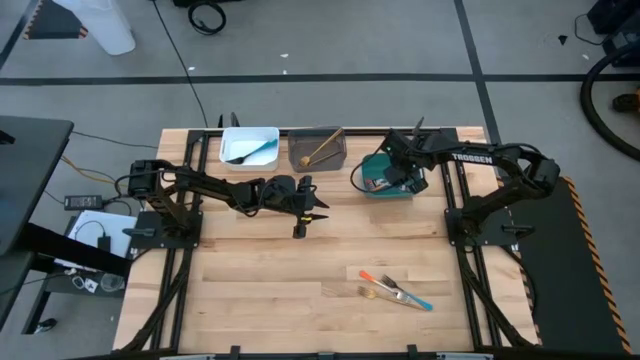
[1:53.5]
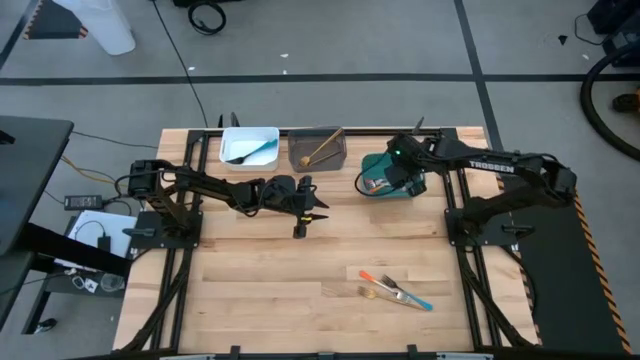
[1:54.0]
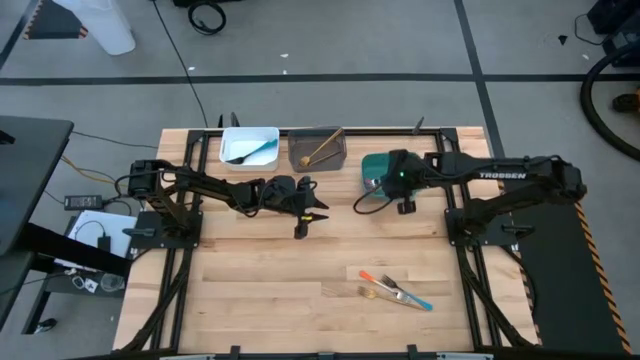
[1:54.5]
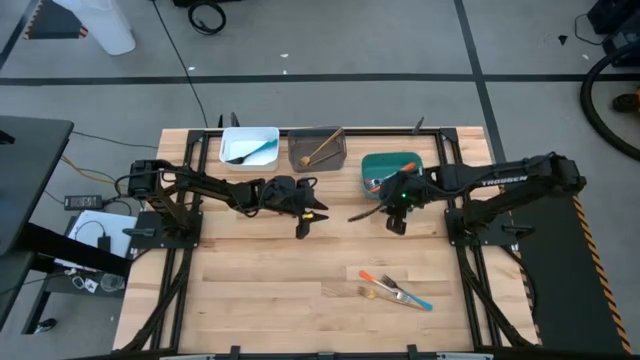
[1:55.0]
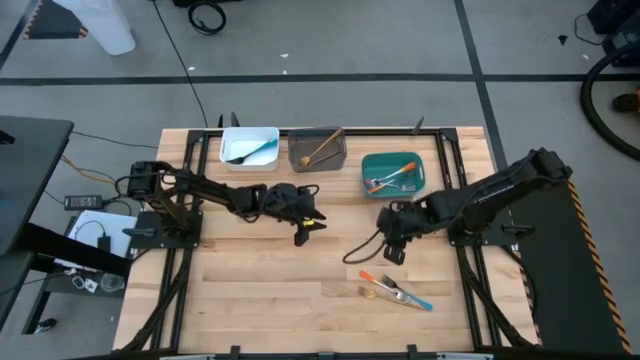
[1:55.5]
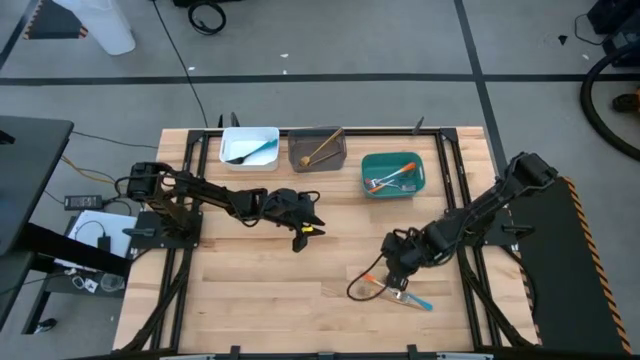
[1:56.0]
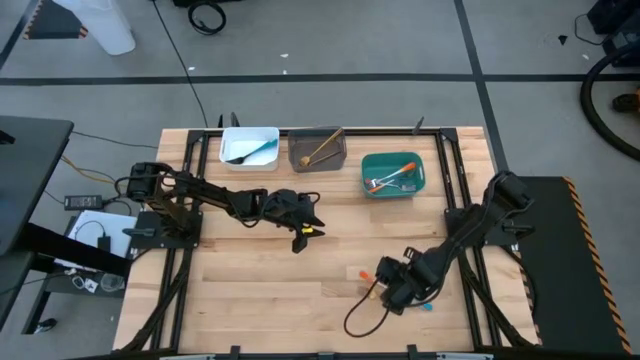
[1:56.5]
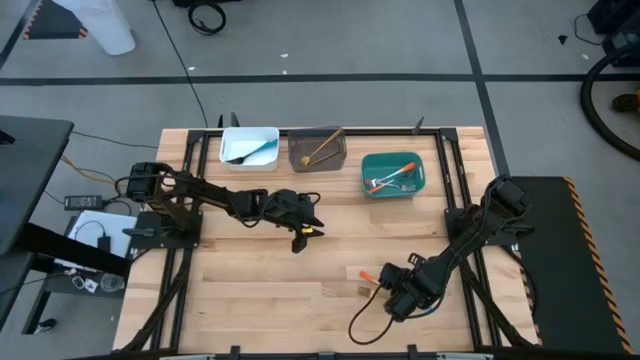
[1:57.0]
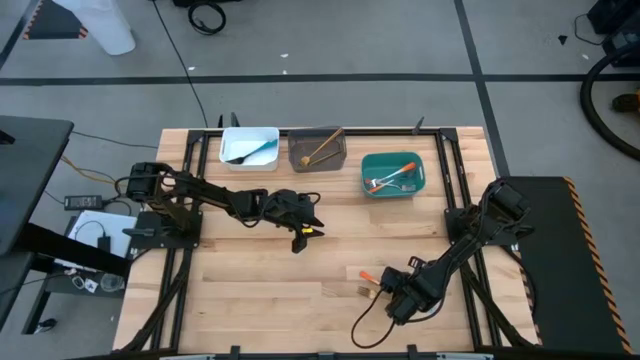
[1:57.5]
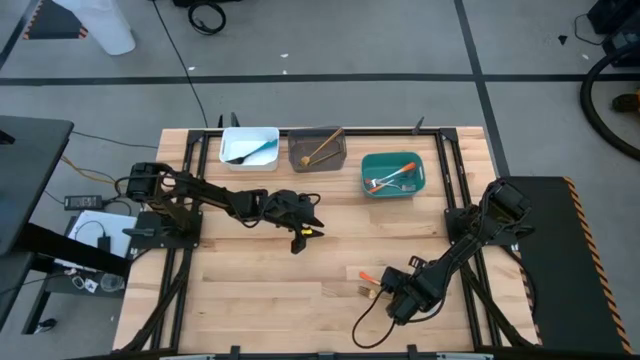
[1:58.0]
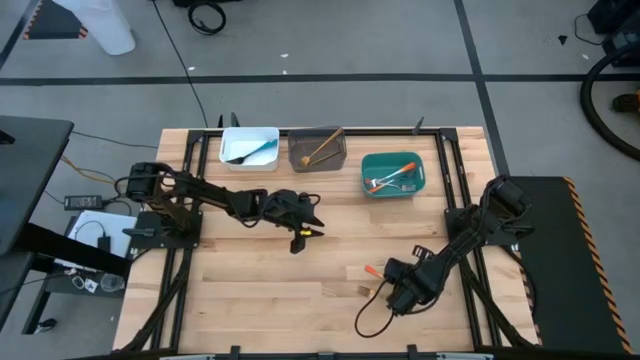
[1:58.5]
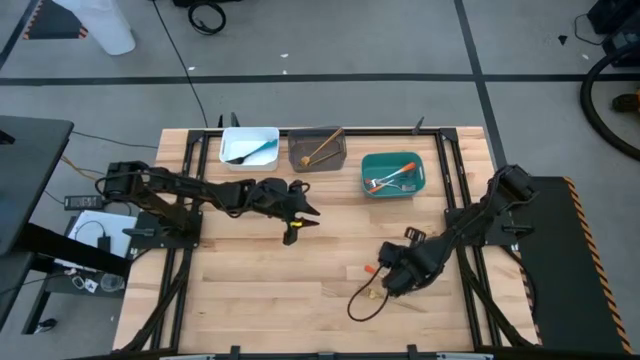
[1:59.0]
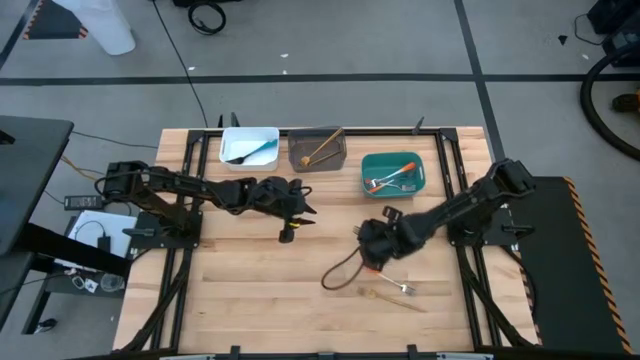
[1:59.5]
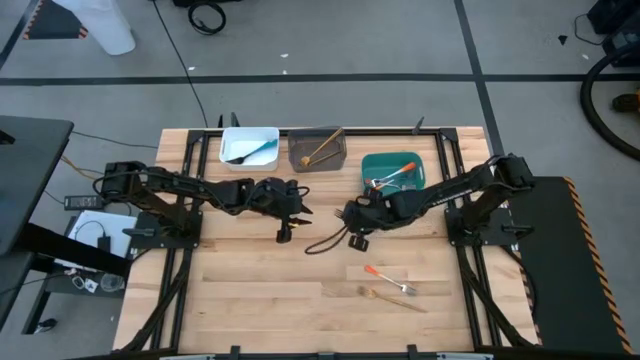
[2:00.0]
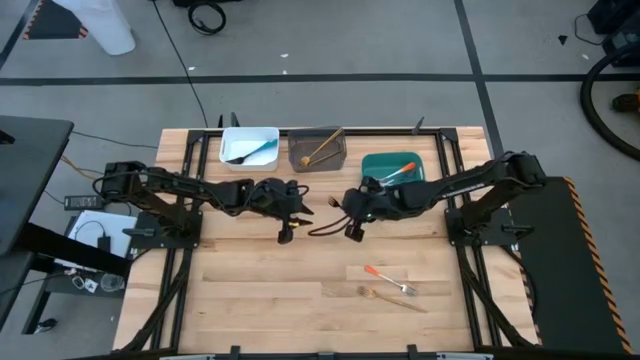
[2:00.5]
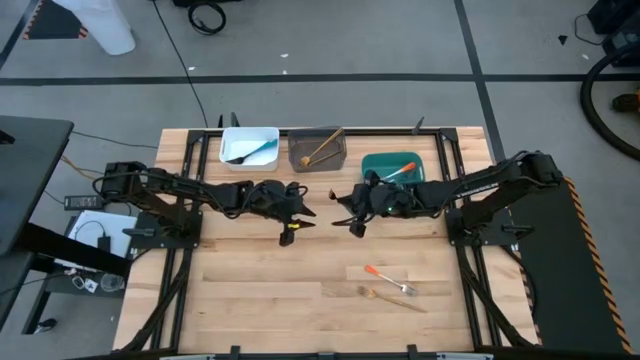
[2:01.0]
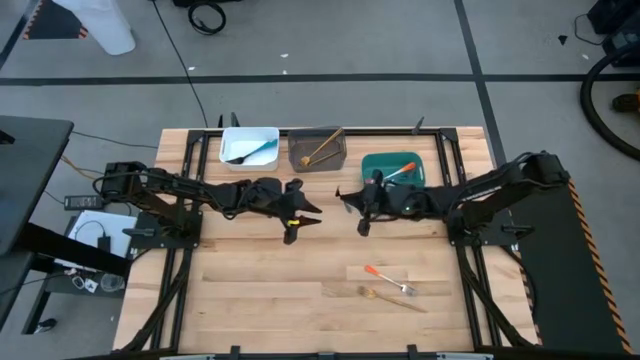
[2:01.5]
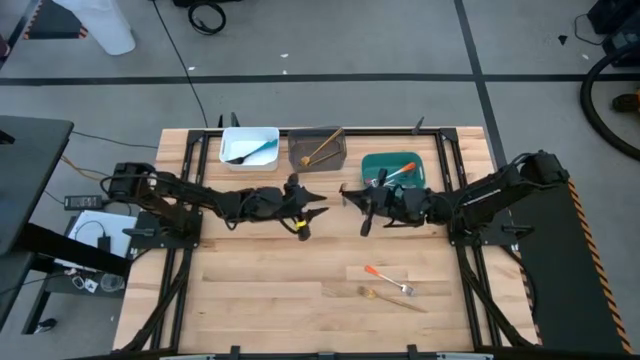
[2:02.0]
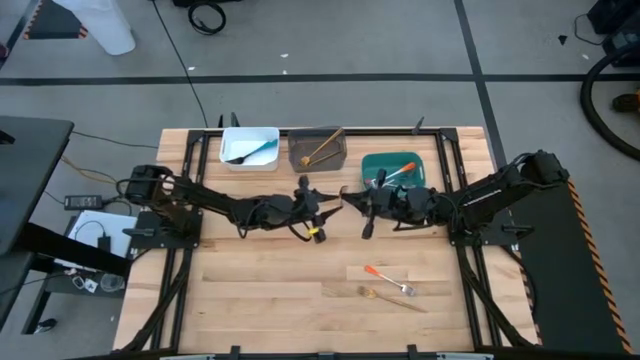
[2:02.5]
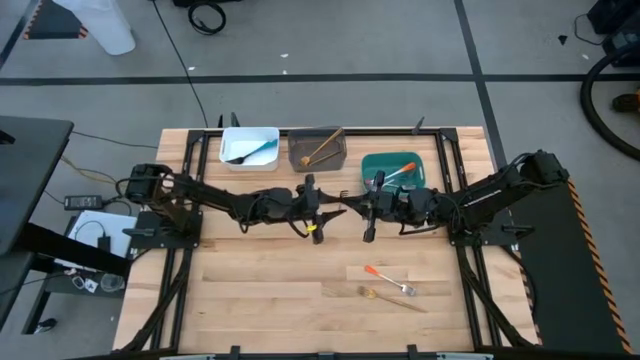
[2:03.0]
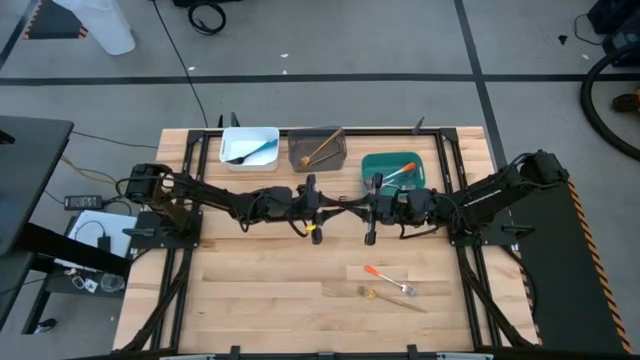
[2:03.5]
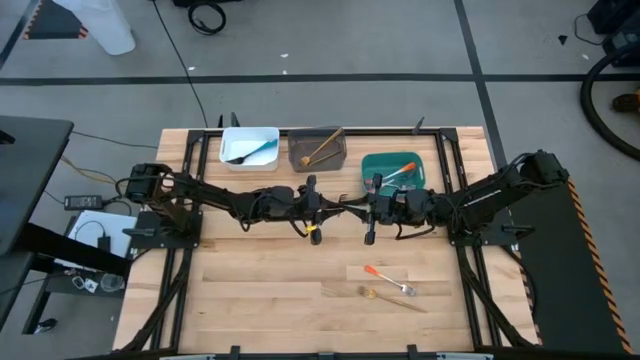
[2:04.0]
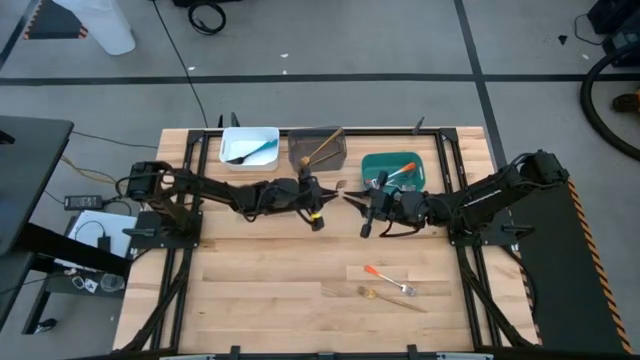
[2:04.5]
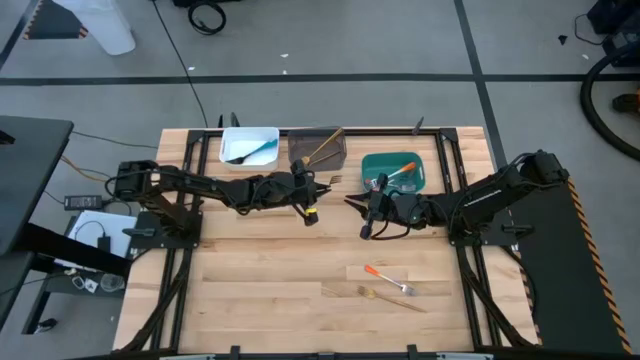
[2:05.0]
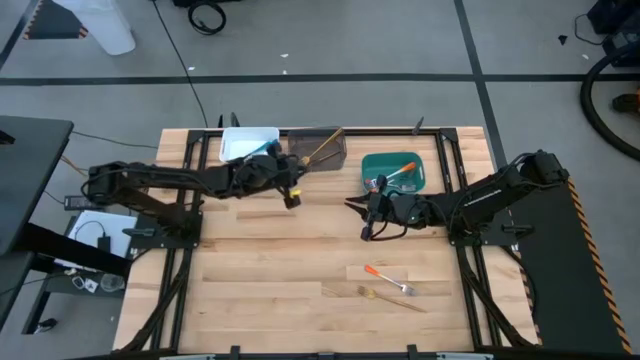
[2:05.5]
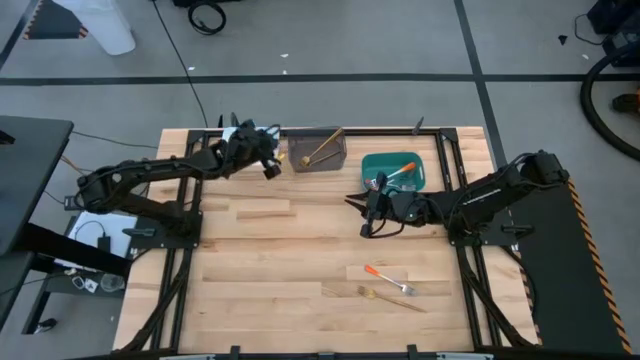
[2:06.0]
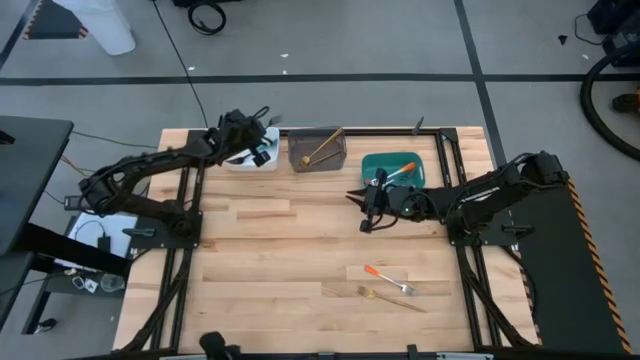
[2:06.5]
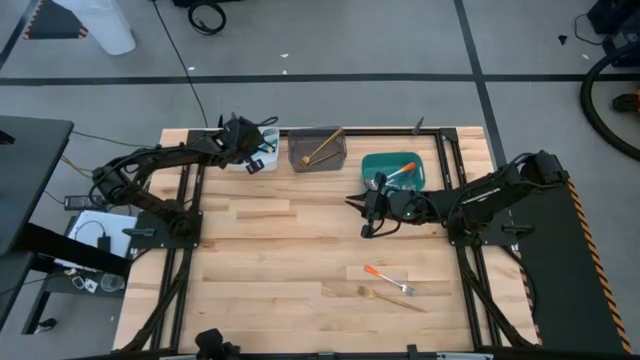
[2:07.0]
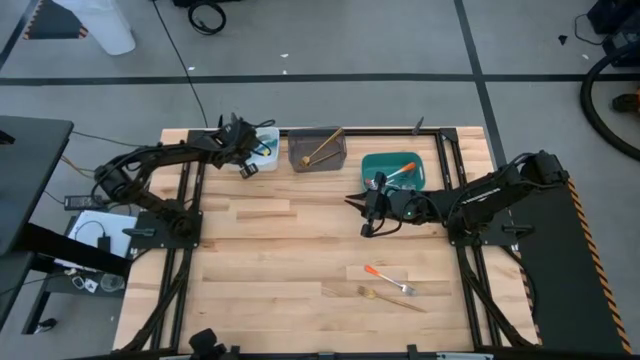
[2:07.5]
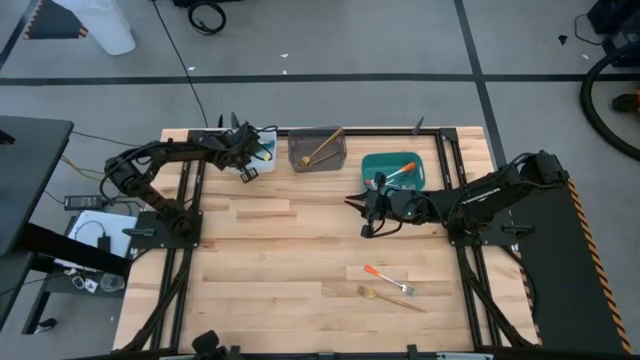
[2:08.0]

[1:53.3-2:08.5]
Task: Sort silverware by color (type)
Put the blue fork into the white bin

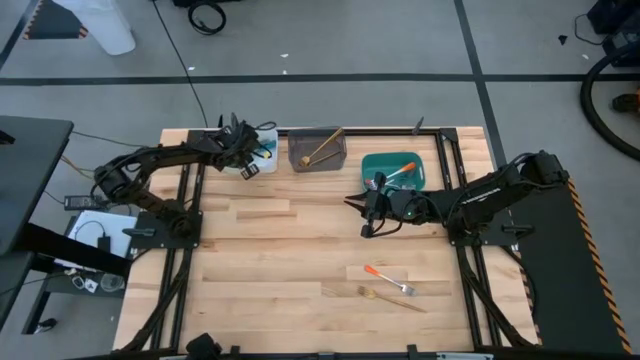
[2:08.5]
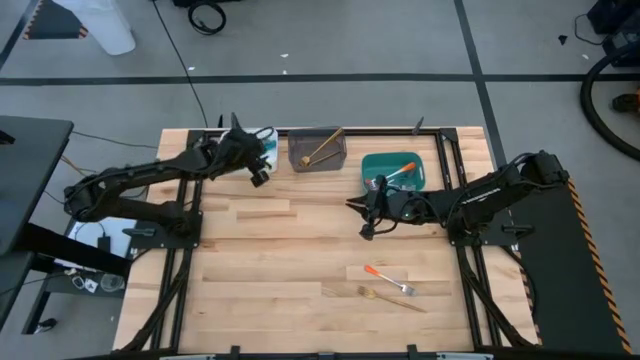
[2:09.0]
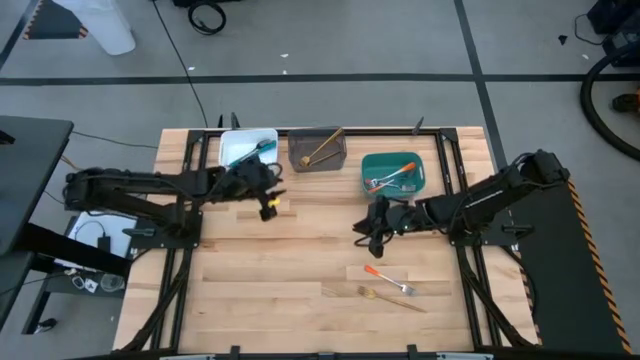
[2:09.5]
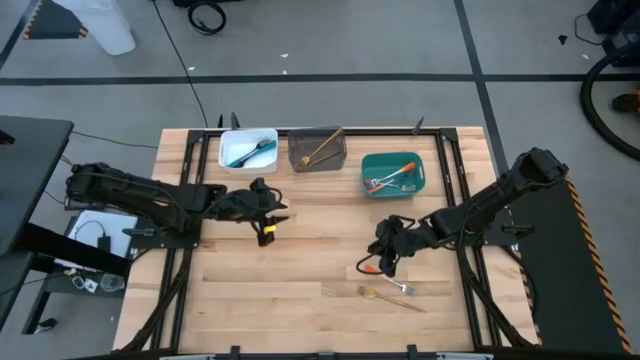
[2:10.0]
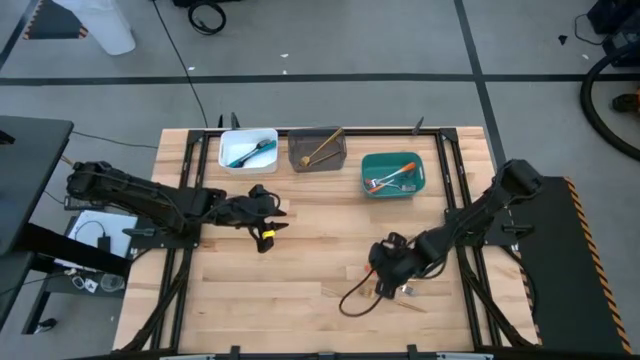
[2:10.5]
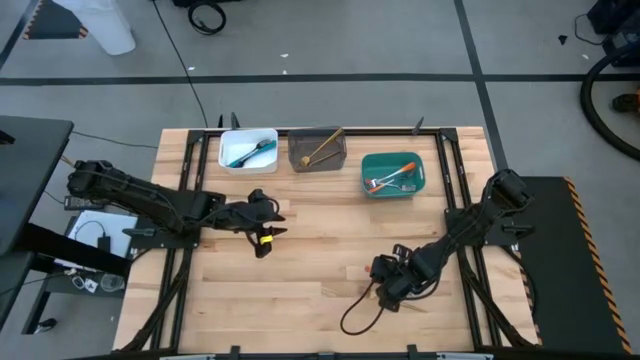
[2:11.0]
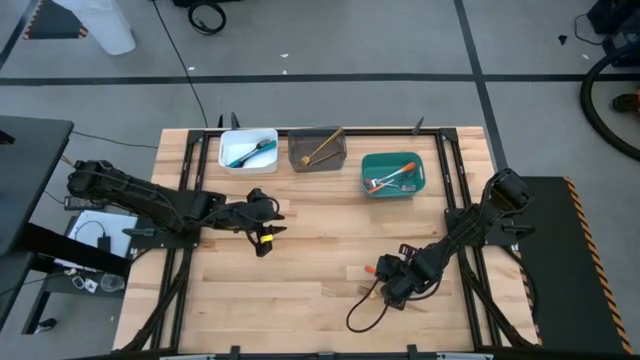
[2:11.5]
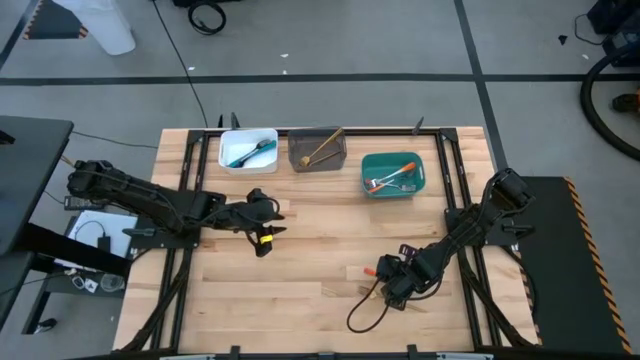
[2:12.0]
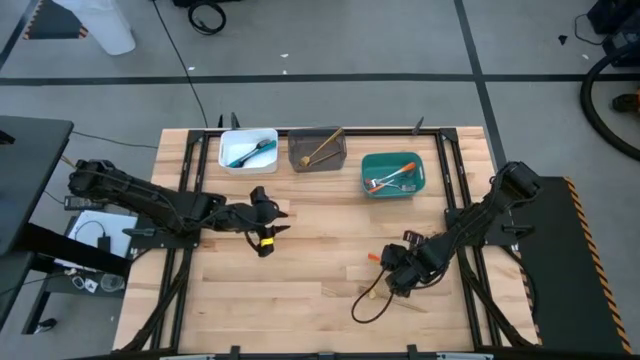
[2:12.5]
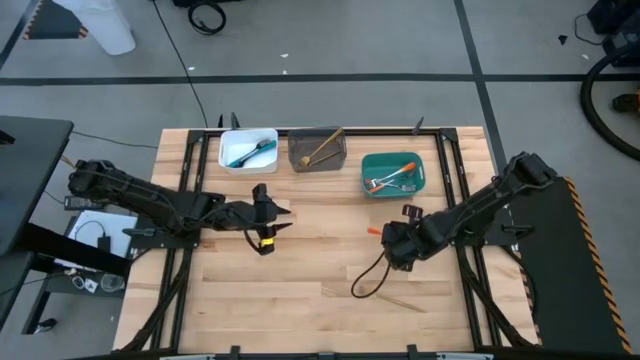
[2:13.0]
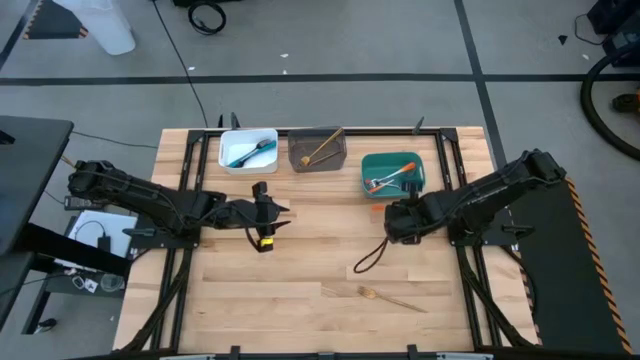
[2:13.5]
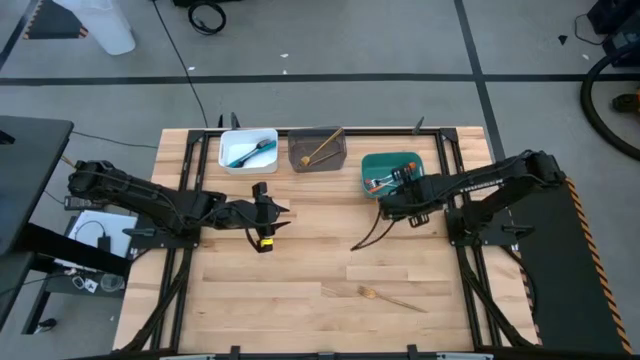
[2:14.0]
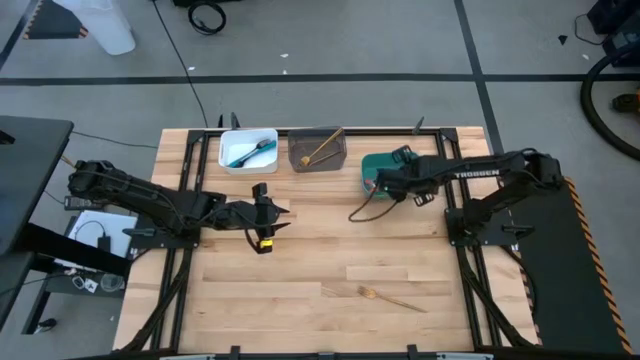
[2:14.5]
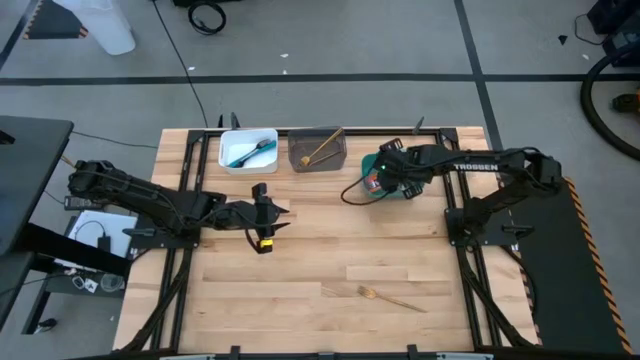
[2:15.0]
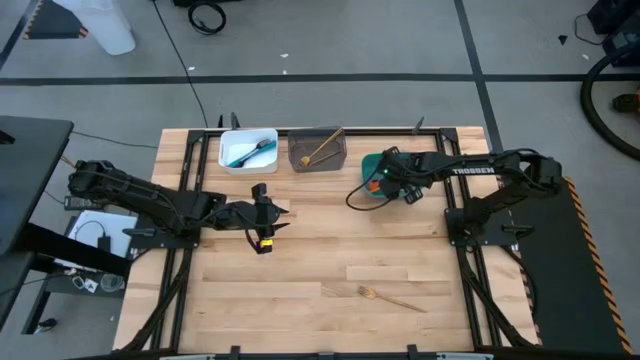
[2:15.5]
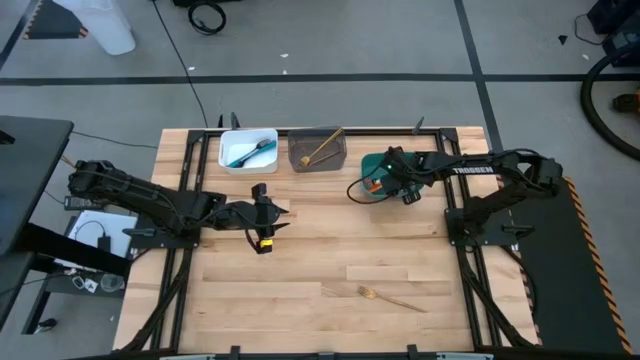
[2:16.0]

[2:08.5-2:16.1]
Put the orange fork into the green bin
